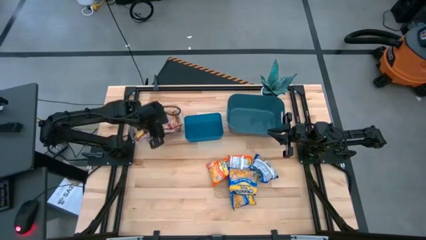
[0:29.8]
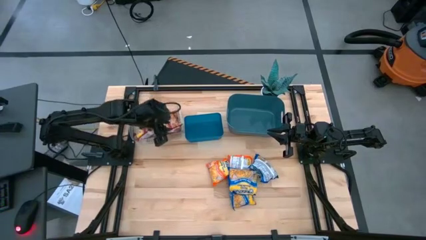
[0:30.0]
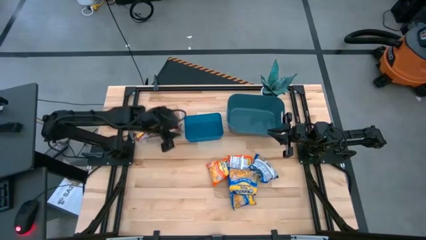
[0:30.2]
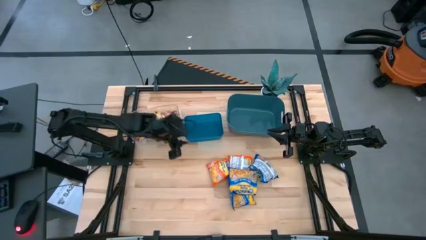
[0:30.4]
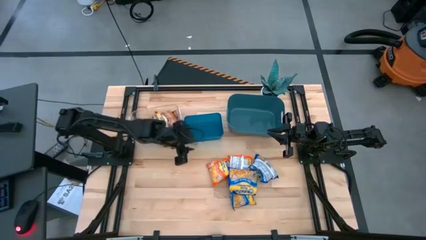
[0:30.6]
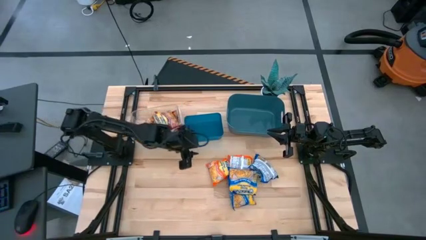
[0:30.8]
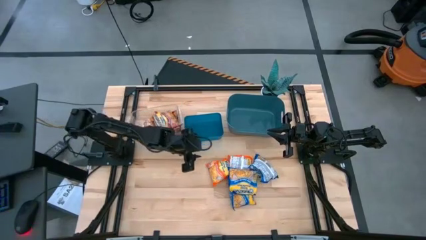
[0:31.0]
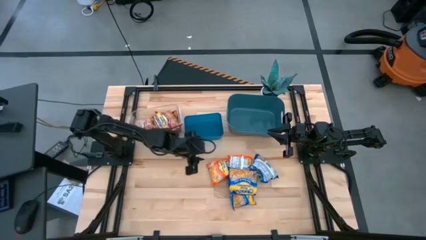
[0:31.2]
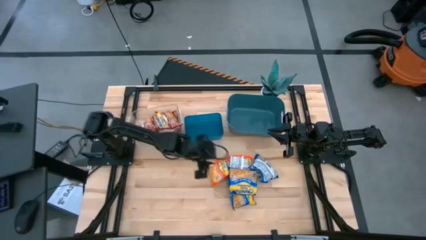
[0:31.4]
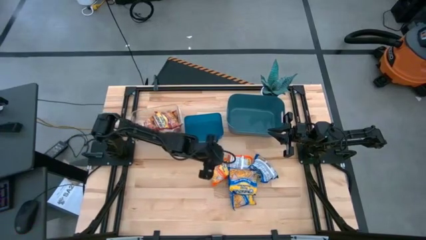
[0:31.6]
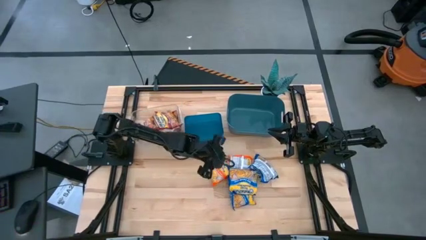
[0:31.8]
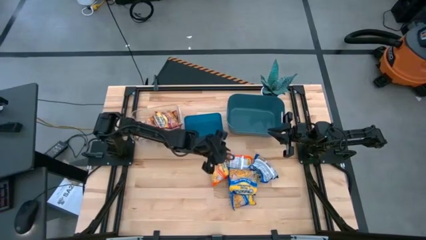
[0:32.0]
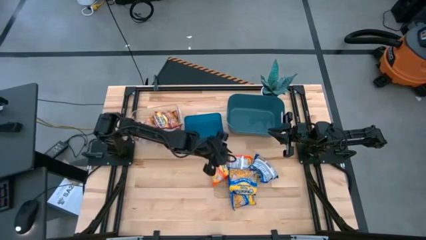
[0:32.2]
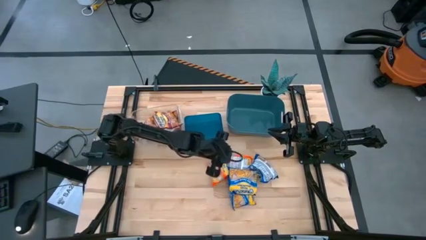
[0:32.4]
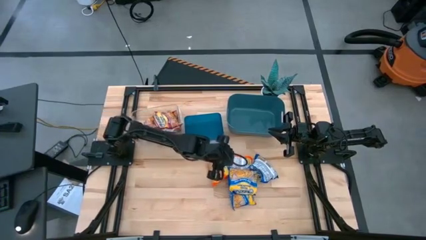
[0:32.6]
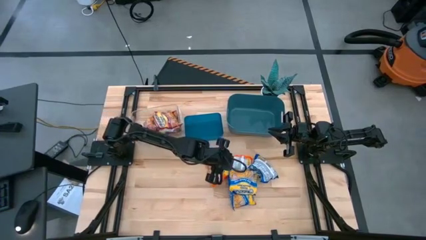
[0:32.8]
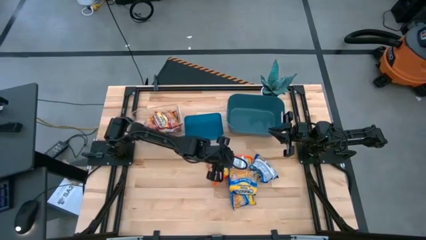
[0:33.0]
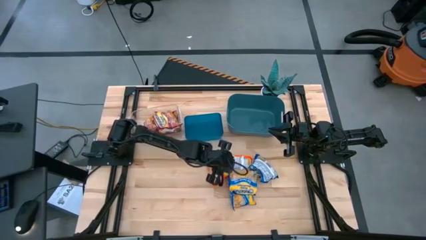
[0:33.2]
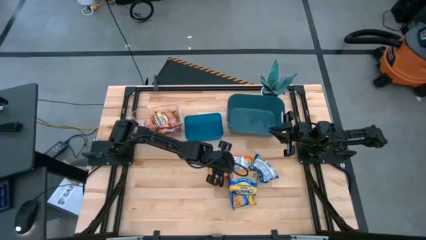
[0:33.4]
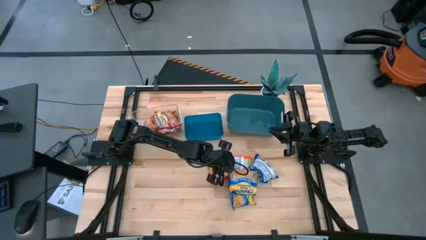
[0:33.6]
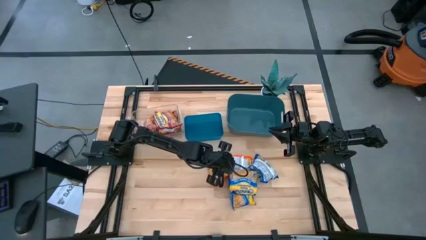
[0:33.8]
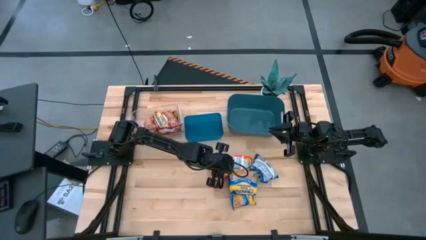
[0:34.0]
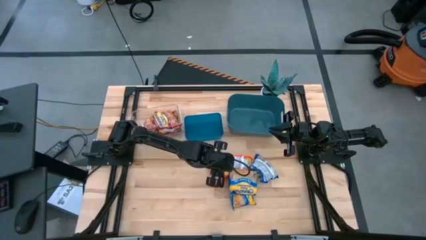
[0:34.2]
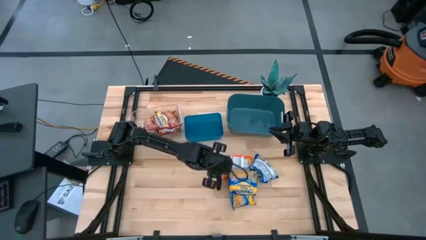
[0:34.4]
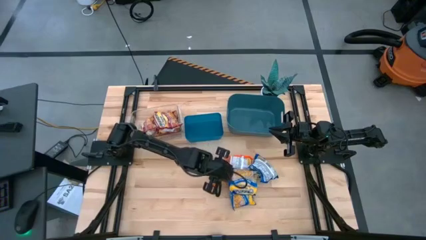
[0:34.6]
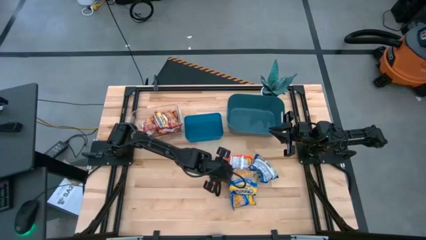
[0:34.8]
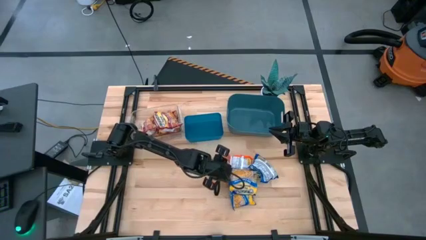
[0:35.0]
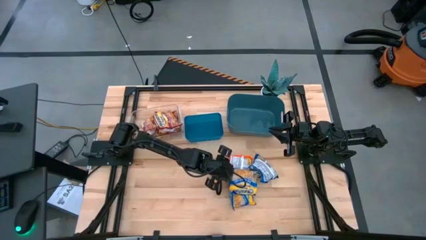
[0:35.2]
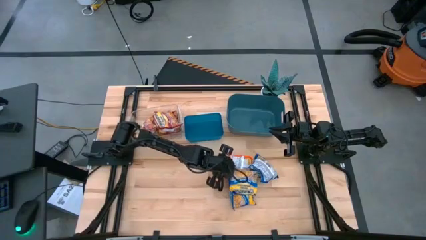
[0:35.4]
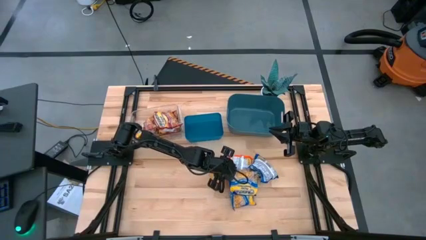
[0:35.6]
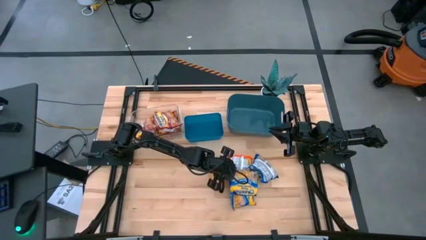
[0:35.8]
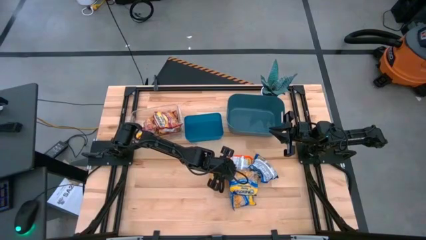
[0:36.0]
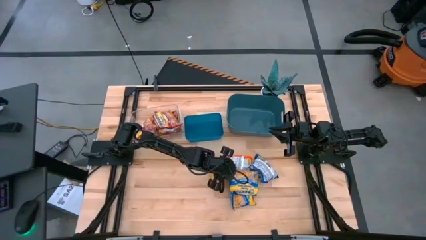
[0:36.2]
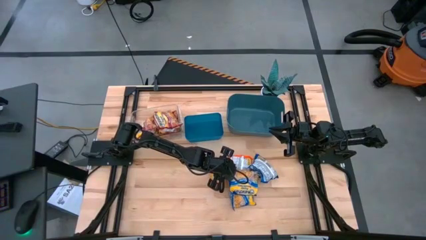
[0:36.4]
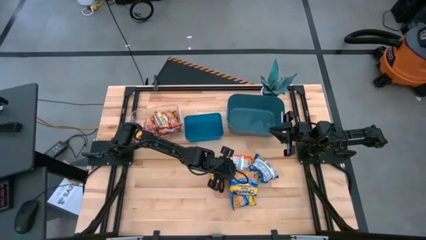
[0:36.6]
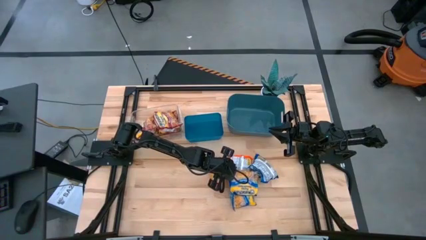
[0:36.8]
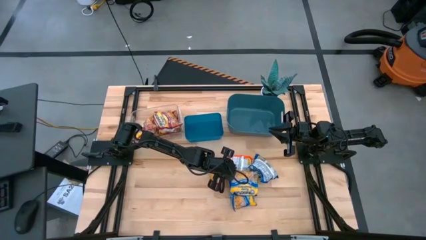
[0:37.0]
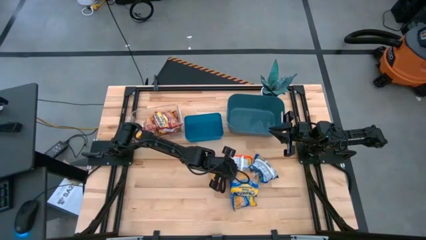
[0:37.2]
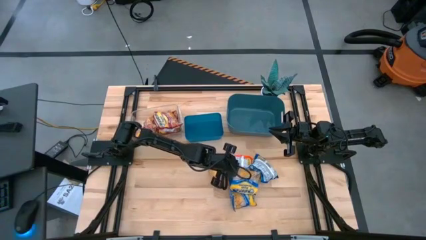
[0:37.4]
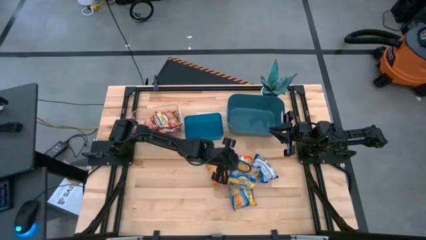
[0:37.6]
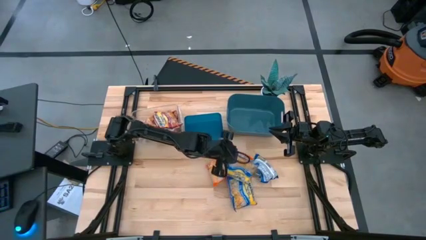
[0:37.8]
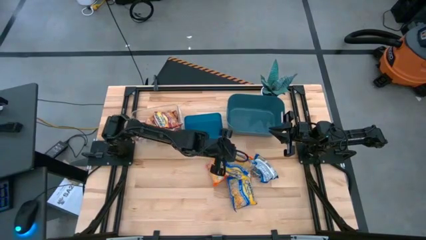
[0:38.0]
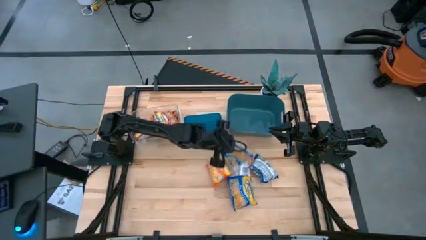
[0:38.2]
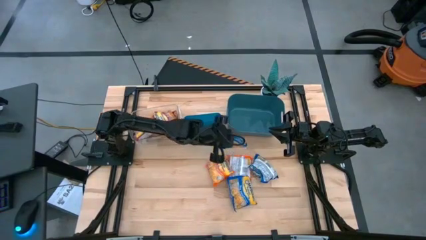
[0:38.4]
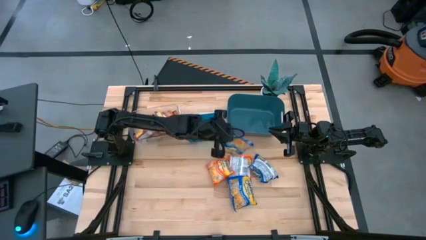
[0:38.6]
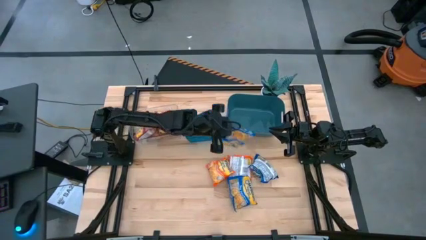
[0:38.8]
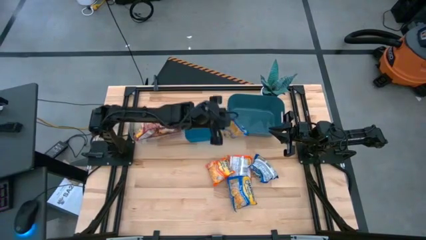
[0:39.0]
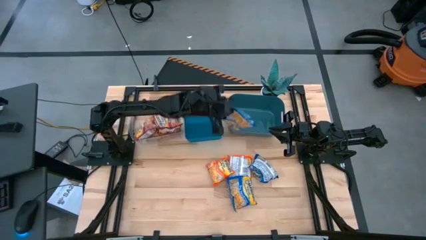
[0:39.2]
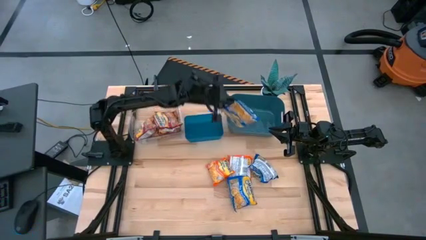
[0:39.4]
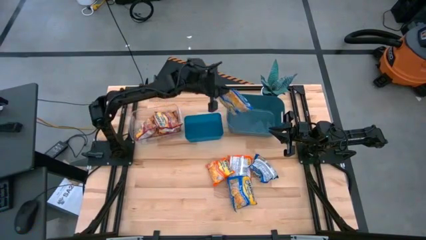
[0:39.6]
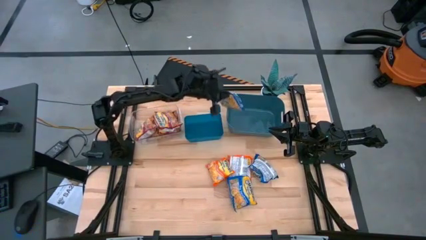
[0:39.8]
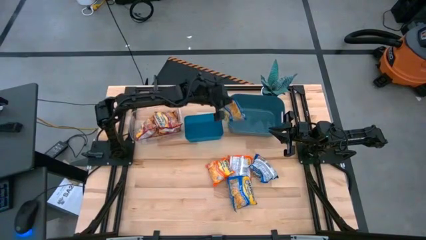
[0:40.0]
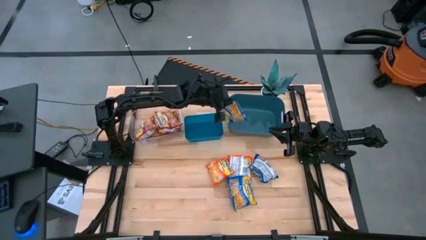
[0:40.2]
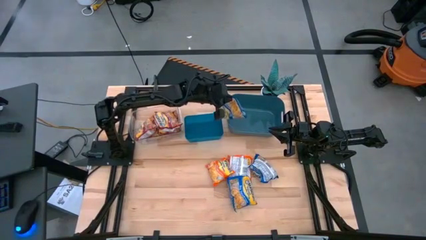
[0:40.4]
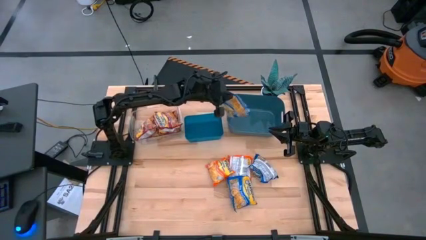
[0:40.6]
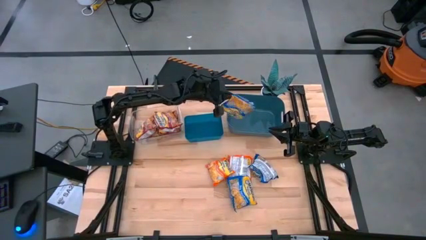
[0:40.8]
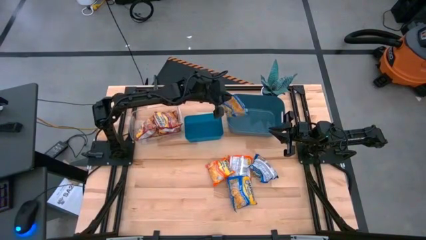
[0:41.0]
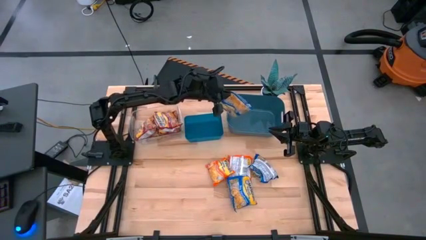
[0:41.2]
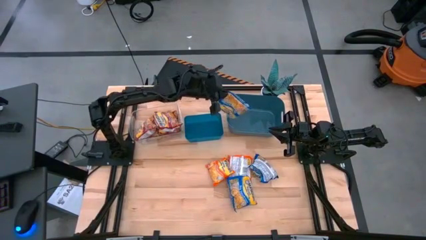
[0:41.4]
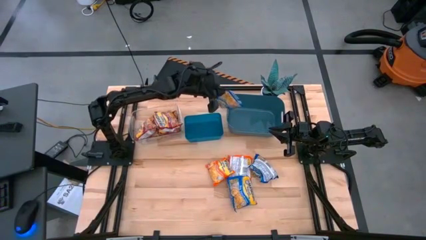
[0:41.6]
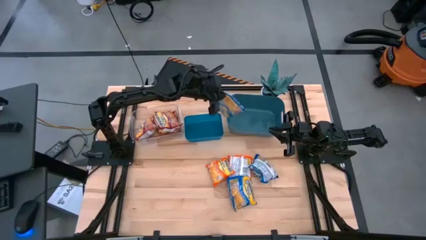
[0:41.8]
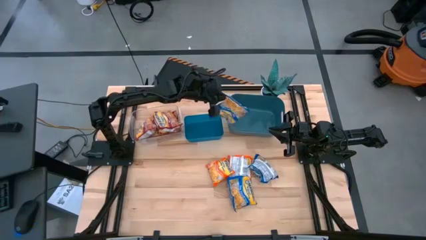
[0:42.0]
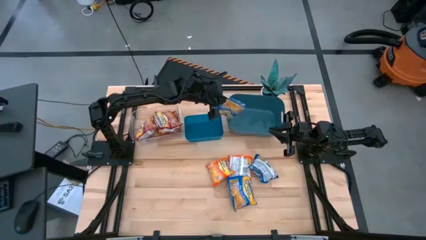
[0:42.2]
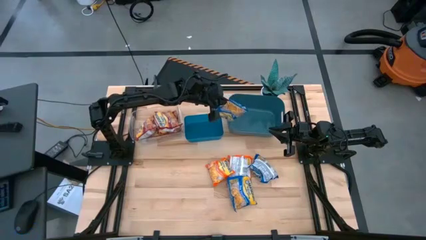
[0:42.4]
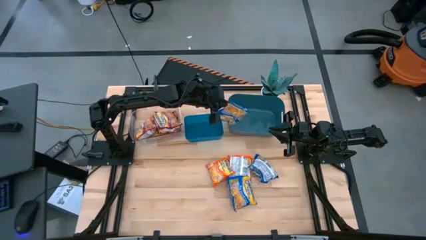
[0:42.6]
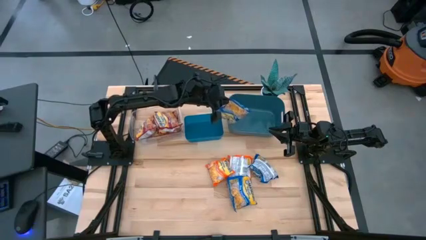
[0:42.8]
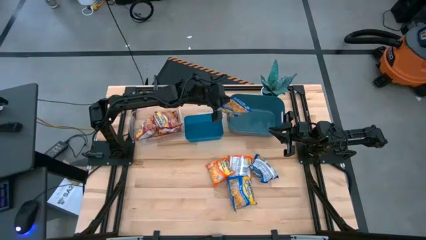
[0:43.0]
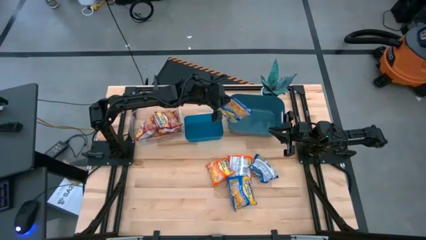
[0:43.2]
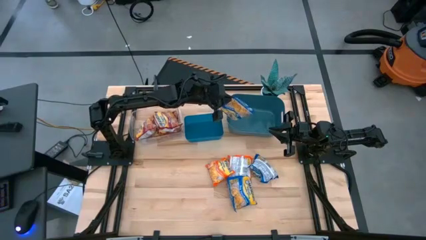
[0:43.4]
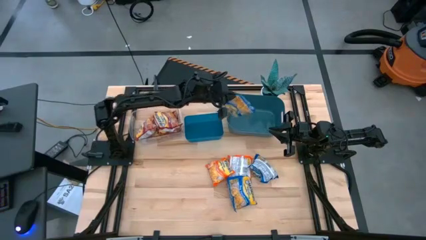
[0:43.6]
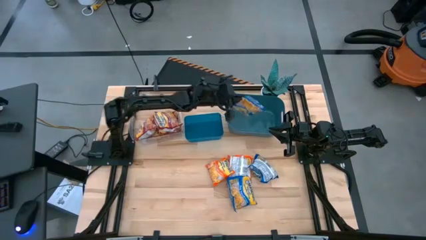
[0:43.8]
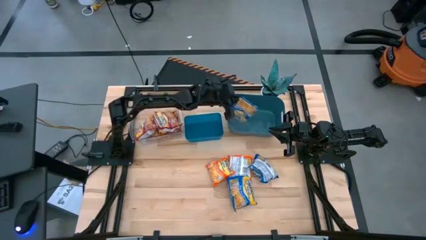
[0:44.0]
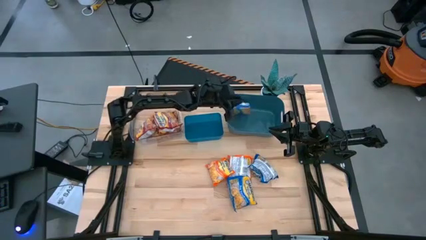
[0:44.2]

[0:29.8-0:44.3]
Task: Sort Maruchan noodles
Put the blue noodle pack into the green bin
